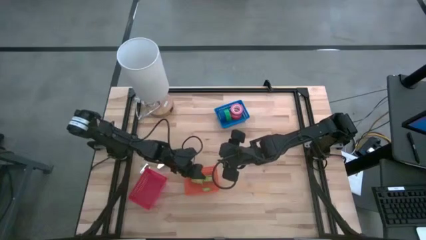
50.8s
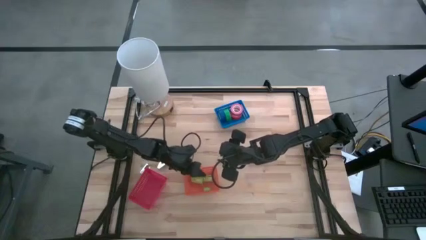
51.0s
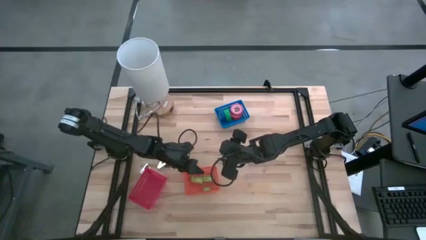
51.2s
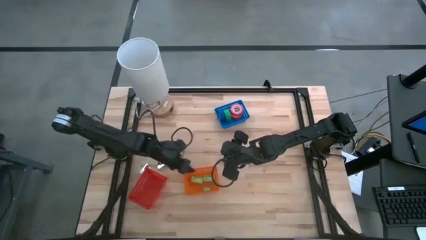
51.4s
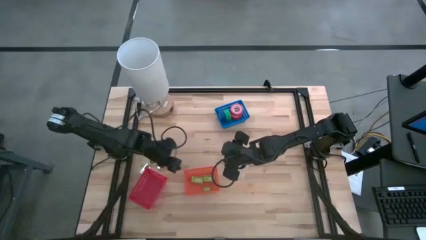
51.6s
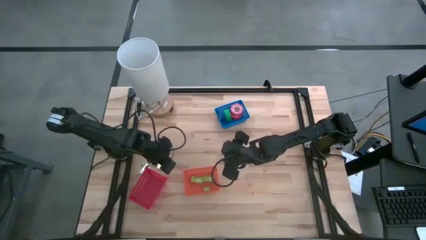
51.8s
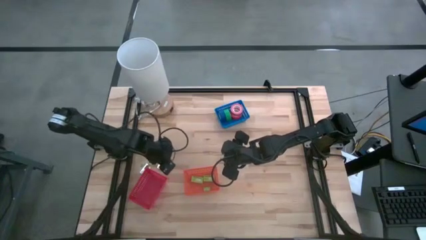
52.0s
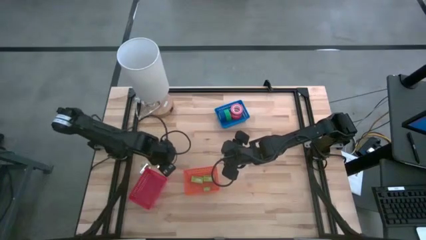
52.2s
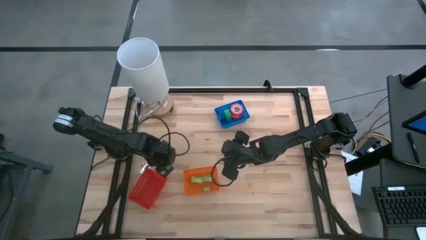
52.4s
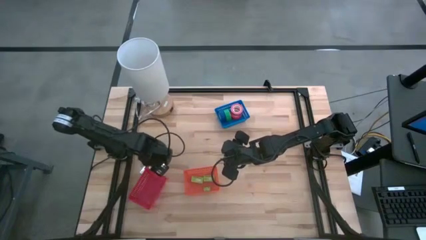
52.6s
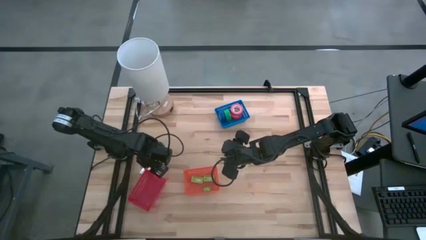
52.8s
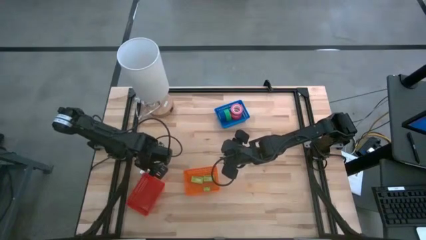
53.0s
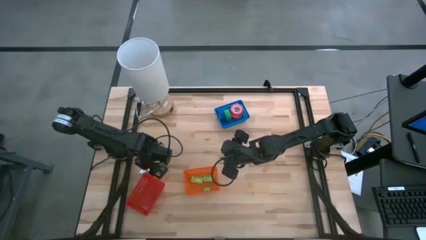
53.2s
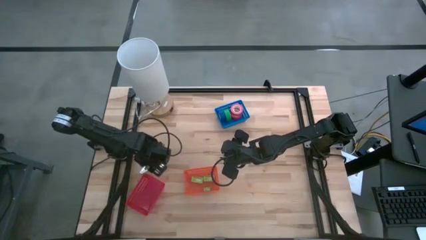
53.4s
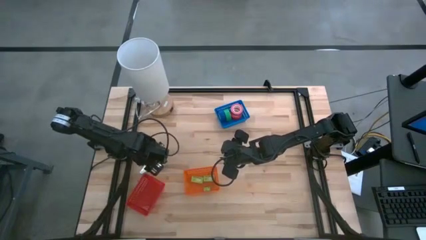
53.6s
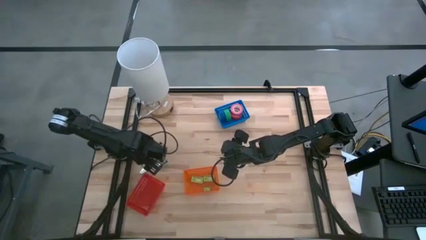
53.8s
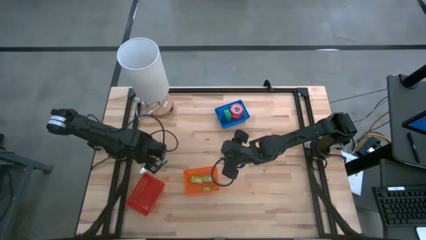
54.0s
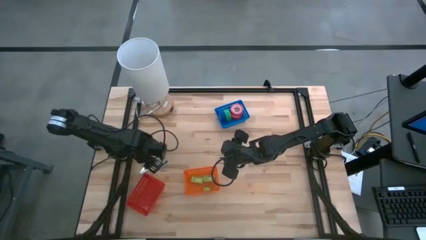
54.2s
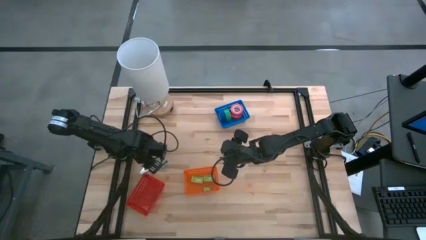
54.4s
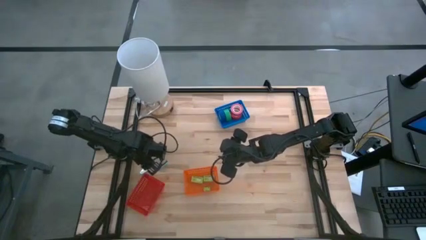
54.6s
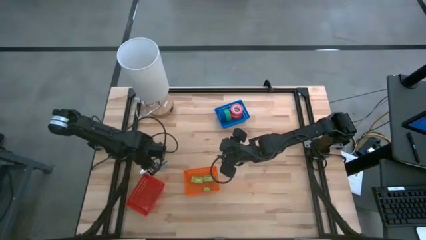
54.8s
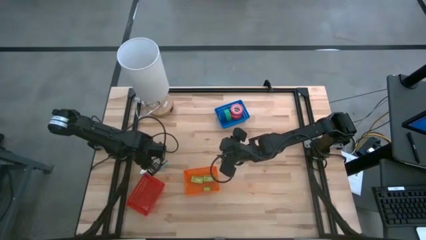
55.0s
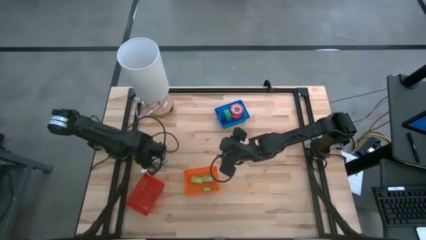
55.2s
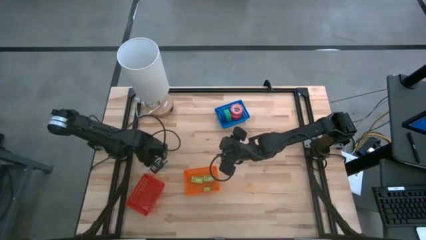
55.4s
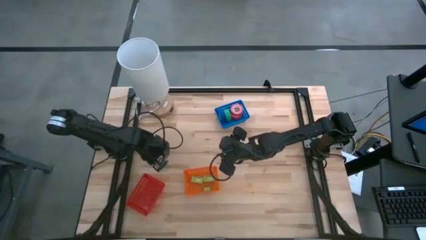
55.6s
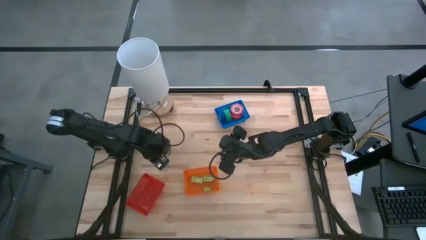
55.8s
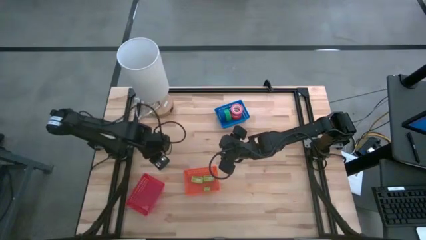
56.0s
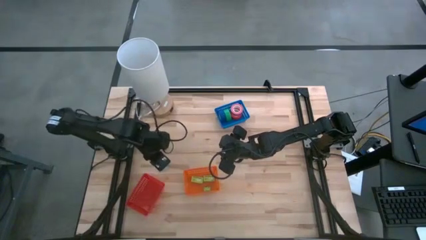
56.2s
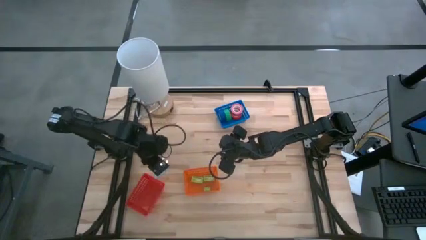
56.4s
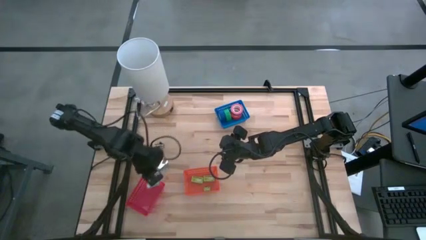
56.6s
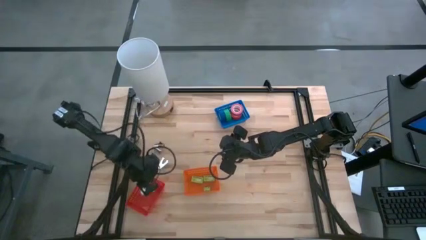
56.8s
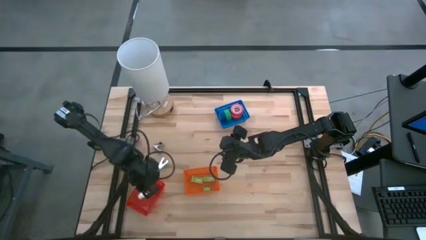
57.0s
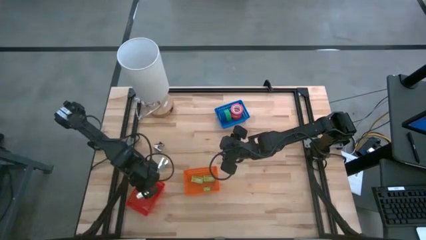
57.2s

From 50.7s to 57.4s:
Task: Pick and place Stapler, Stapler remover, tape
Put the left light blue staple remover into the red bin

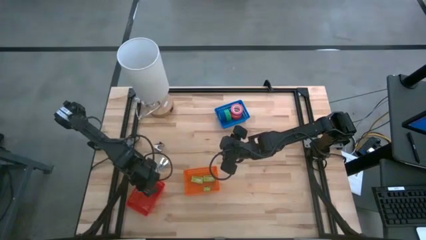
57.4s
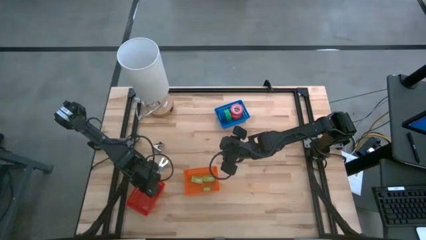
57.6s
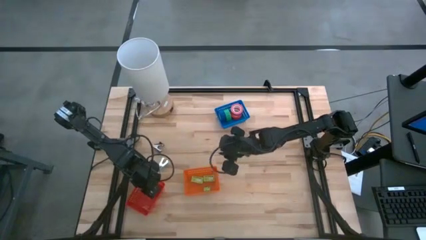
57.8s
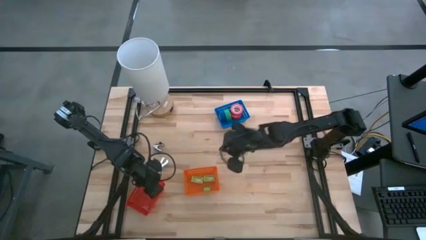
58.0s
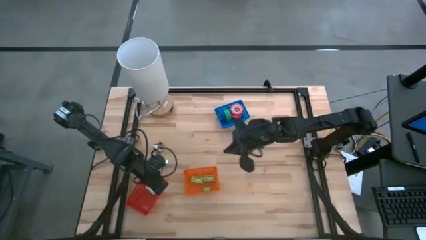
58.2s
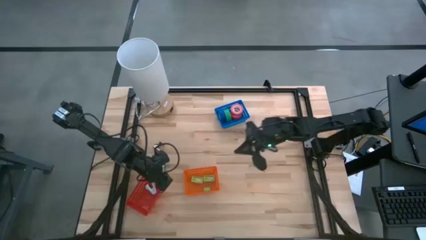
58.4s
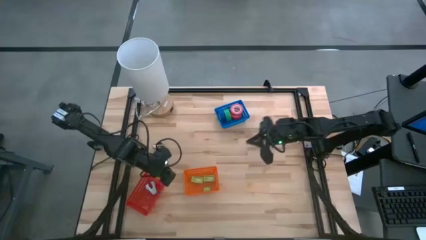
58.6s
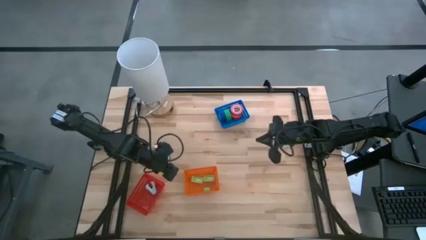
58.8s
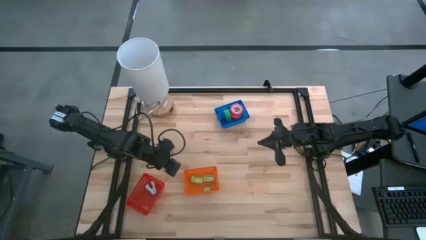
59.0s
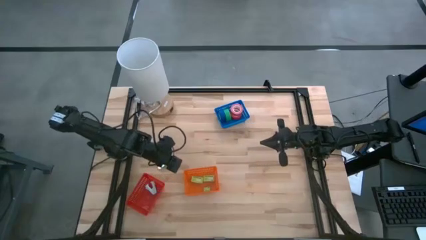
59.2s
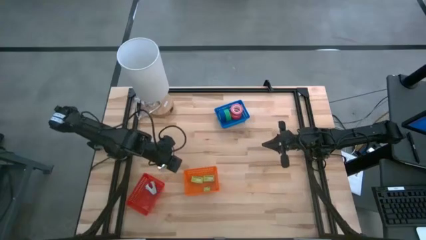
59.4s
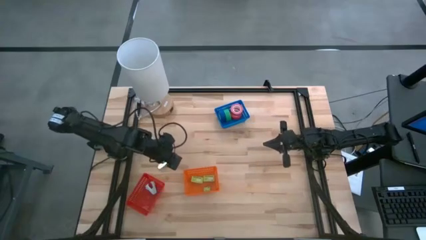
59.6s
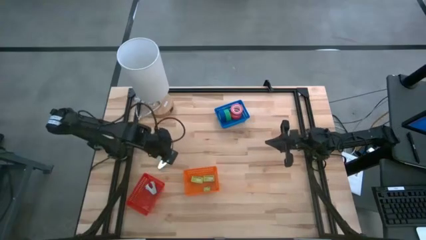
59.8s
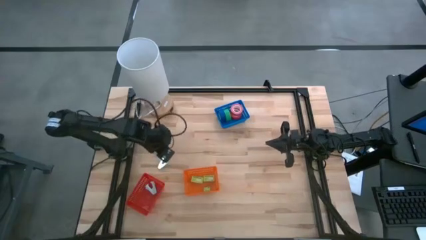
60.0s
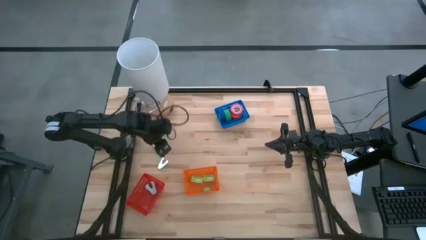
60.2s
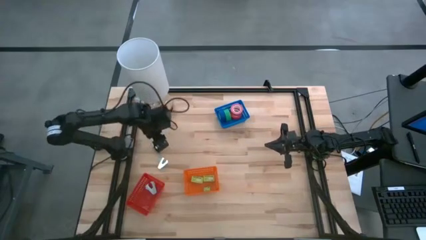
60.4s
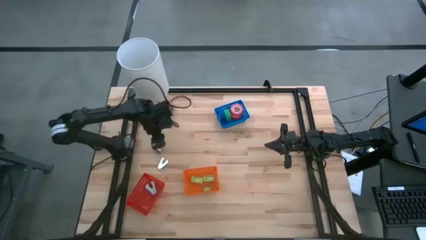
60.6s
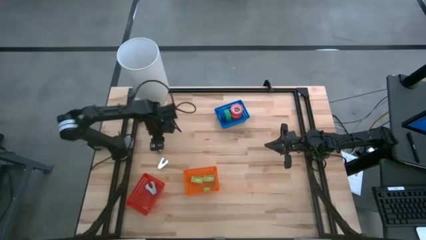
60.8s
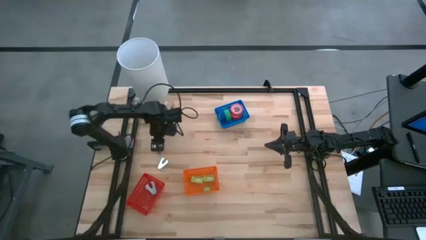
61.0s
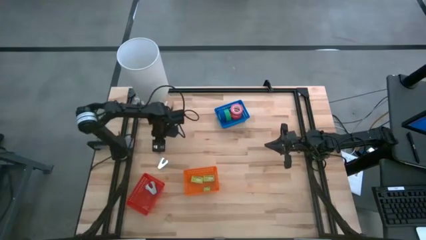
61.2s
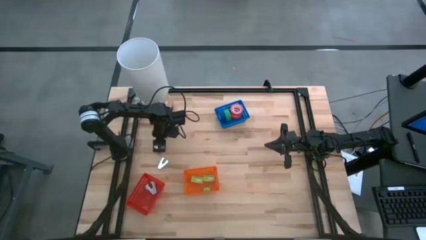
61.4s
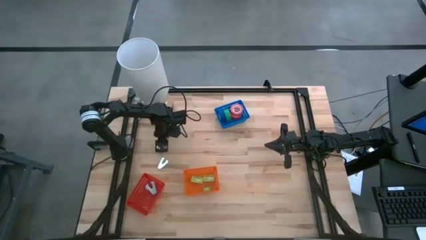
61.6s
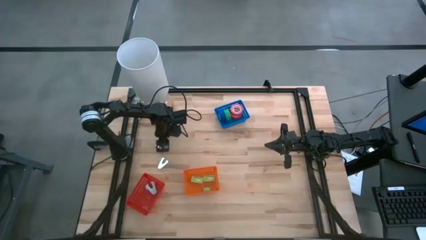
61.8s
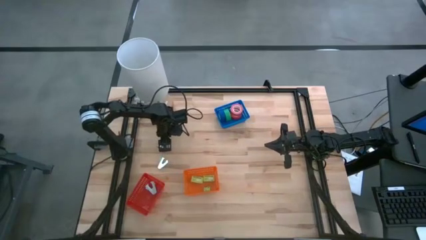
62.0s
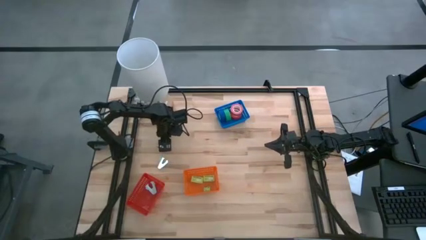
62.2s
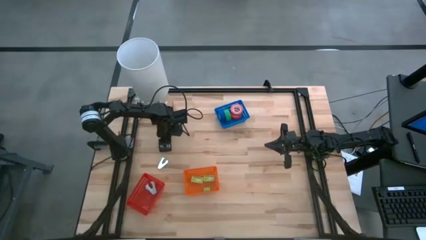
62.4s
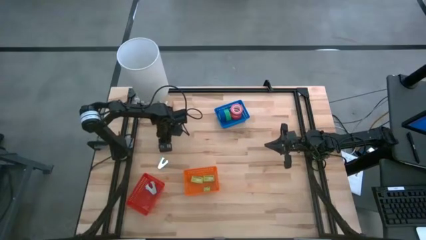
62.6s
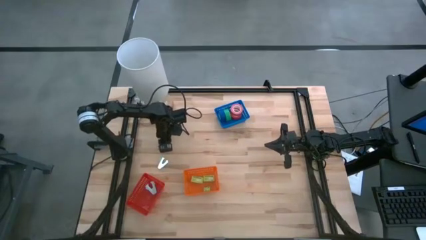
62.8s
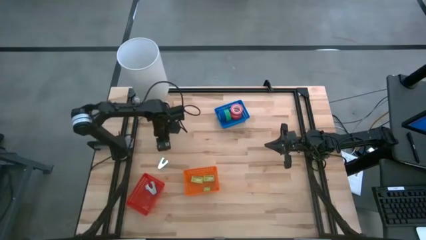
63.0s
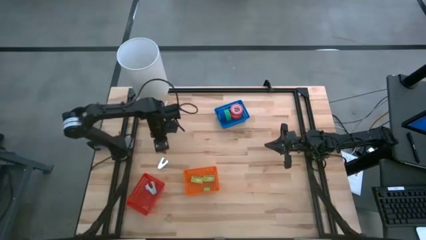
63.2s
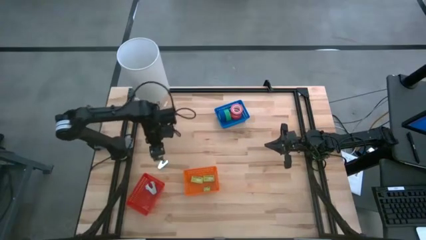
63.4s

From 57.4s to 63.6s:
Put the black staple remover into the red bin

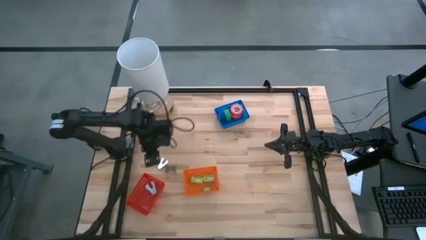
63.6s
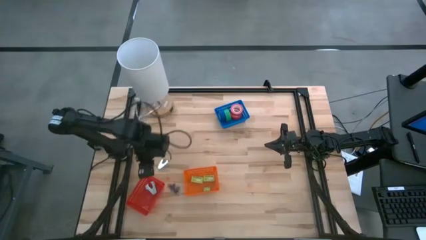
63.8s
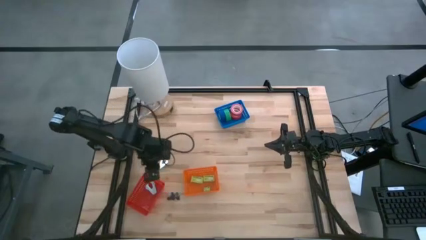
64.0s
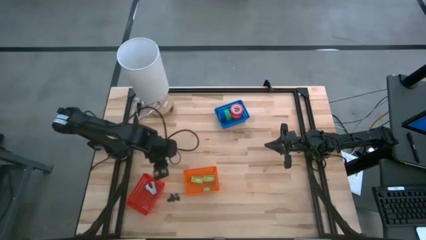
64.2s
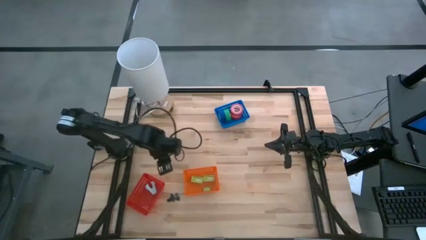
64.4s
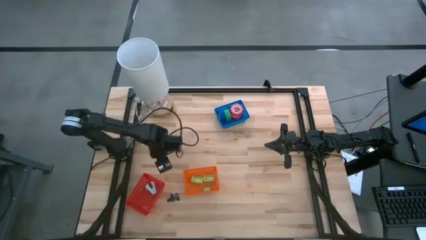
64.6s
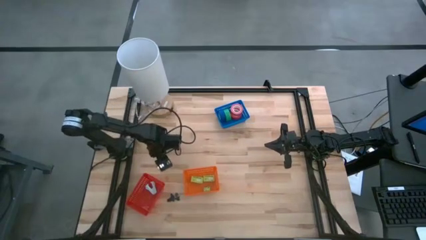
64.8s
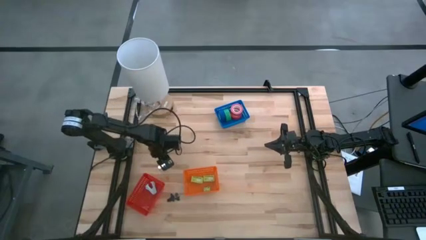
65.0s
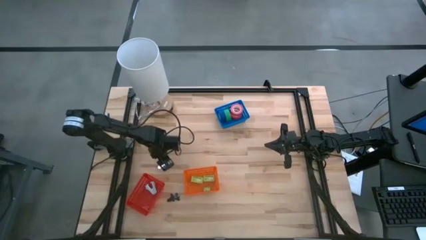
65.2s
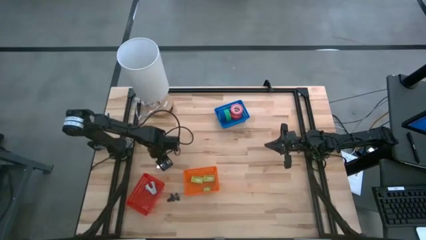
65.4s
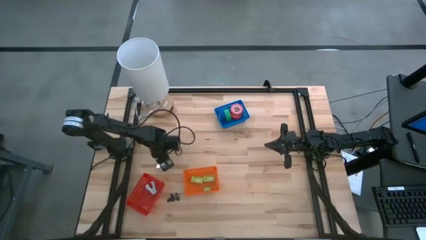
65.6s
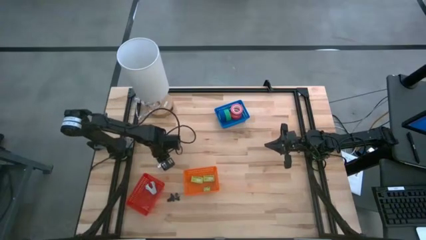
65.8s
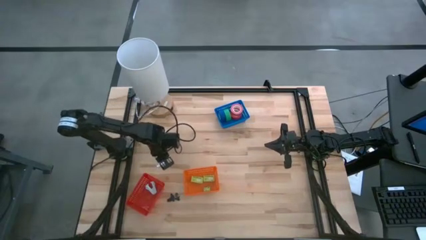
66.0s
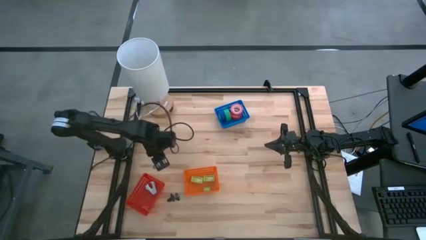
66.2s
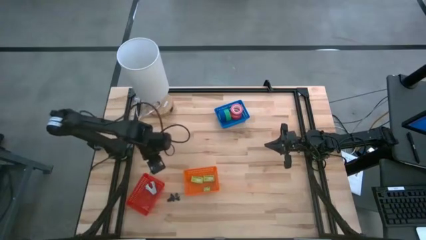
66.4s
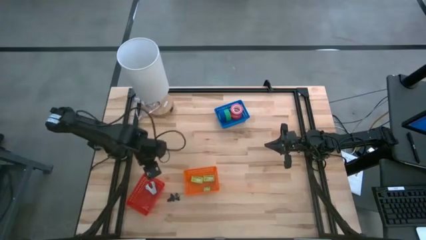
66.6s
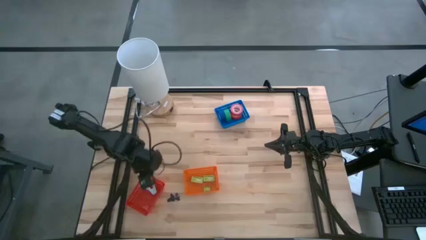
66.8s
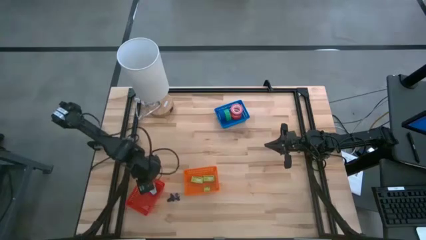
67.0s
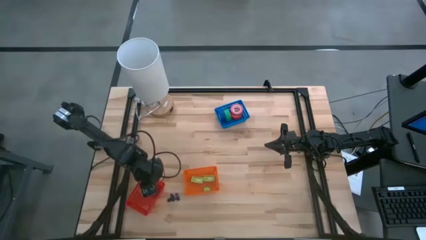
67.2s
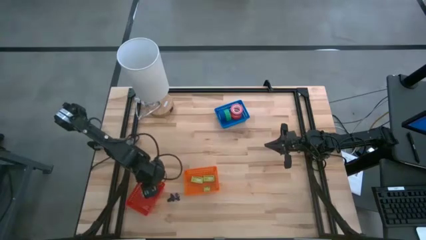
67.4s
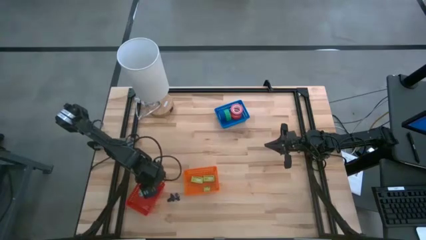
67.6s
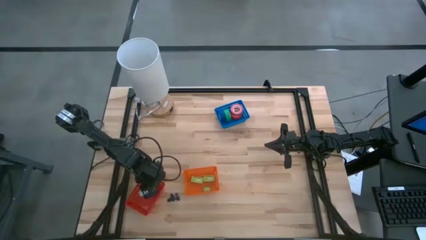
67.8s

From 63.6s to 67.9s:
Put the light blue staple remover into the red bin
